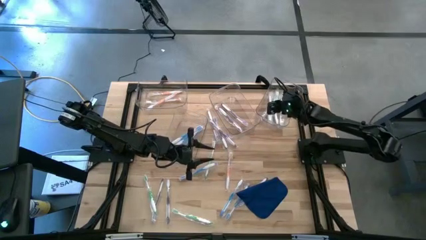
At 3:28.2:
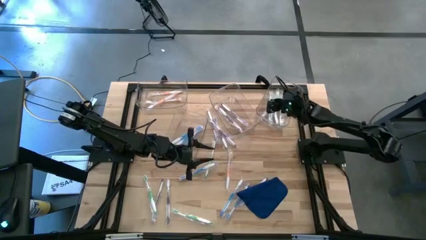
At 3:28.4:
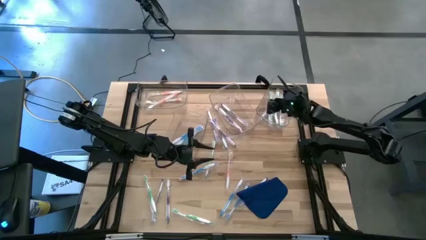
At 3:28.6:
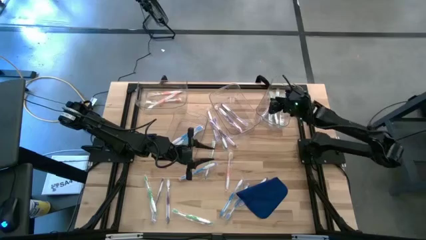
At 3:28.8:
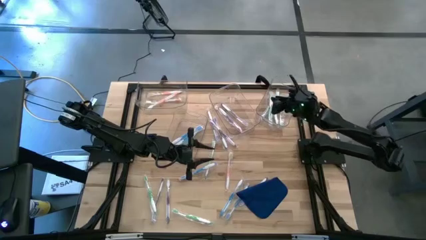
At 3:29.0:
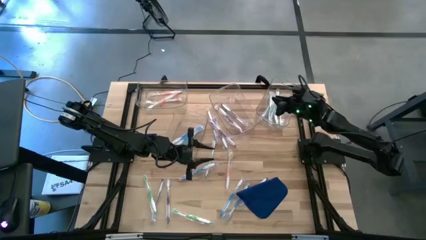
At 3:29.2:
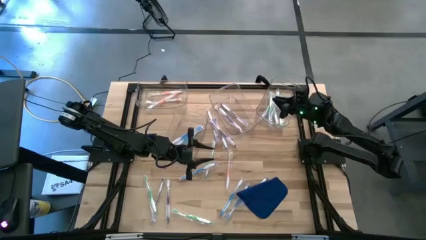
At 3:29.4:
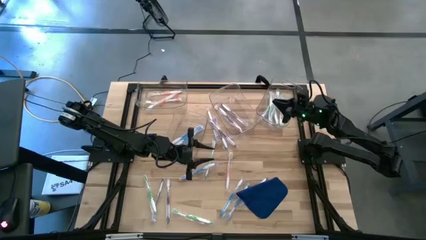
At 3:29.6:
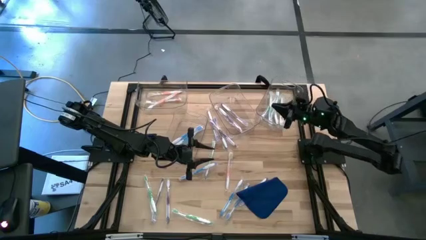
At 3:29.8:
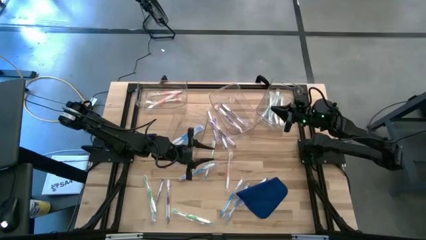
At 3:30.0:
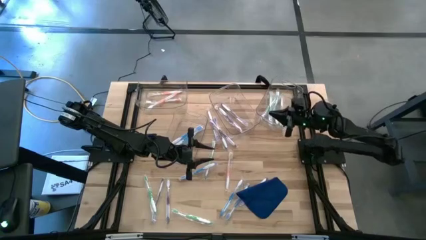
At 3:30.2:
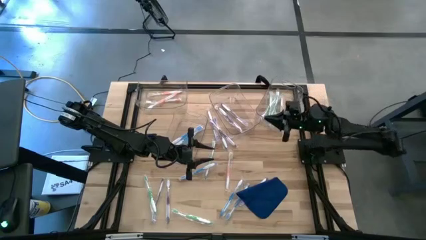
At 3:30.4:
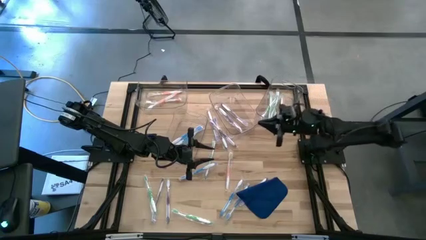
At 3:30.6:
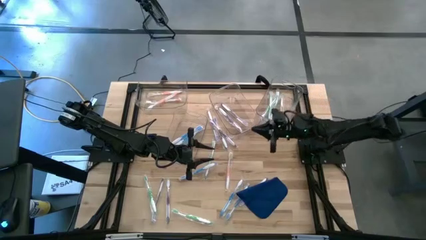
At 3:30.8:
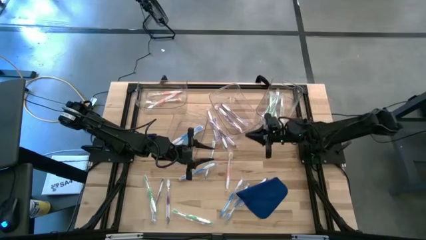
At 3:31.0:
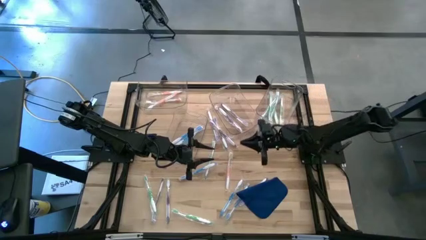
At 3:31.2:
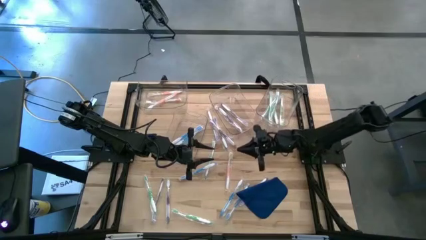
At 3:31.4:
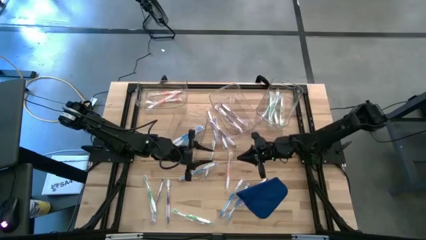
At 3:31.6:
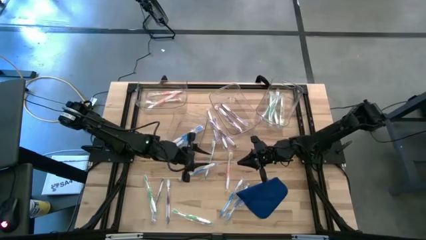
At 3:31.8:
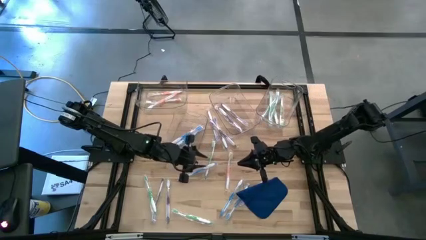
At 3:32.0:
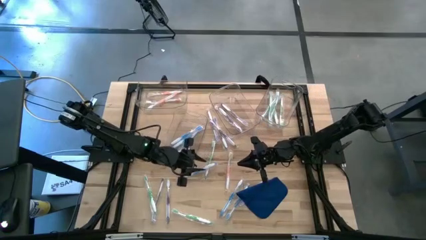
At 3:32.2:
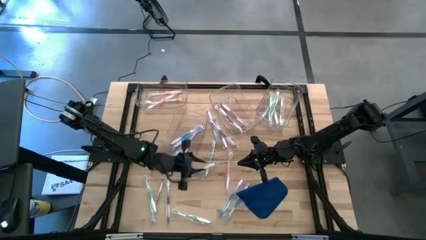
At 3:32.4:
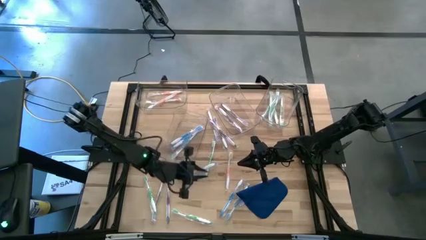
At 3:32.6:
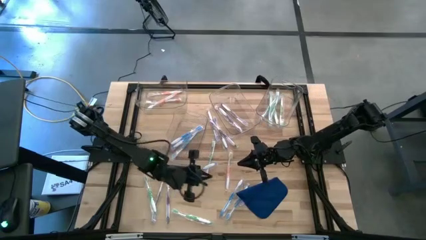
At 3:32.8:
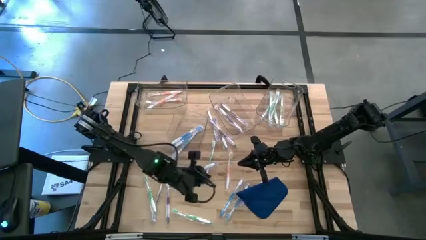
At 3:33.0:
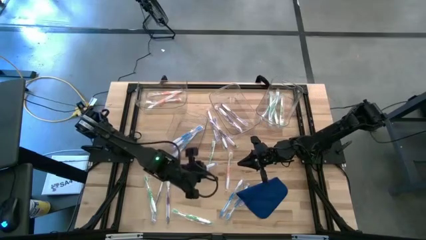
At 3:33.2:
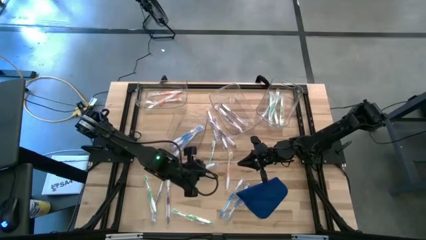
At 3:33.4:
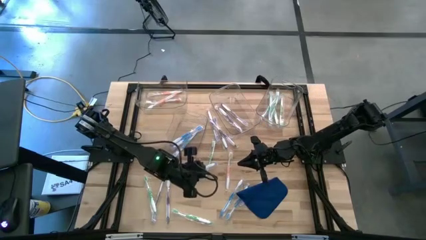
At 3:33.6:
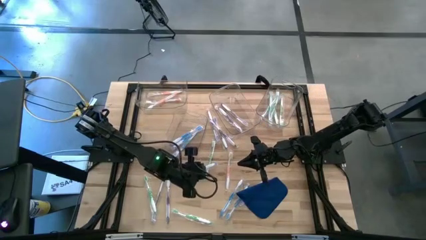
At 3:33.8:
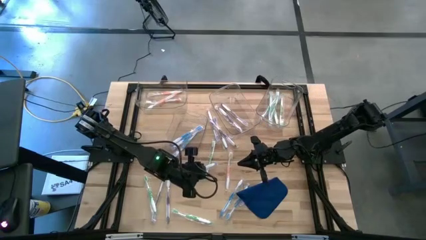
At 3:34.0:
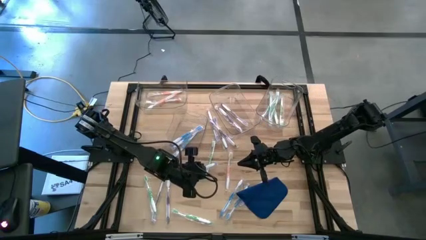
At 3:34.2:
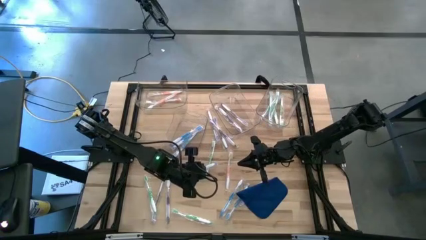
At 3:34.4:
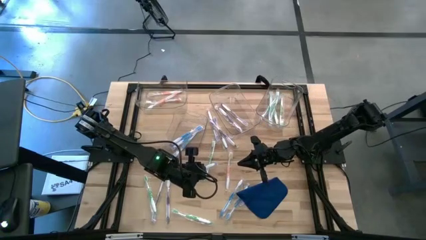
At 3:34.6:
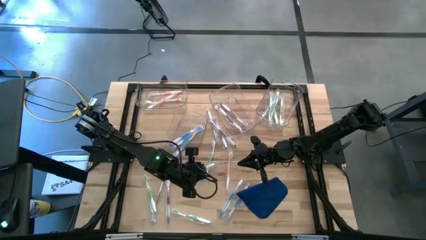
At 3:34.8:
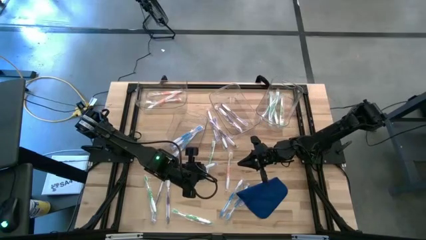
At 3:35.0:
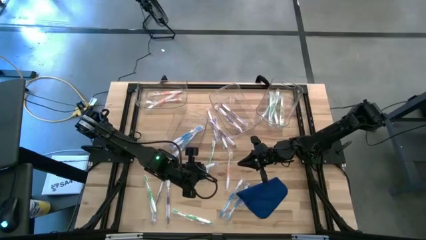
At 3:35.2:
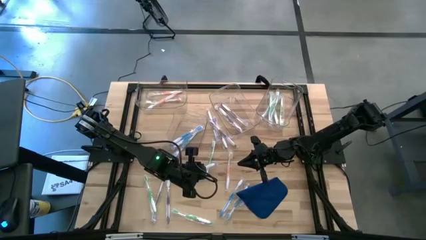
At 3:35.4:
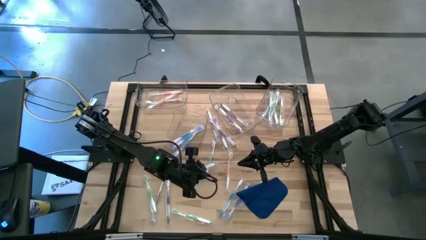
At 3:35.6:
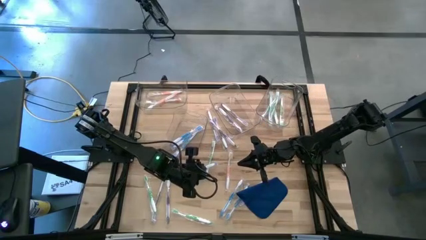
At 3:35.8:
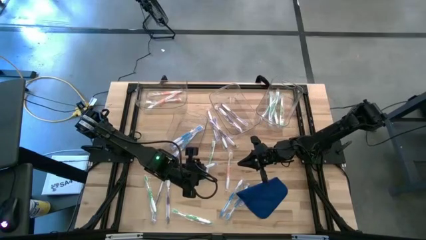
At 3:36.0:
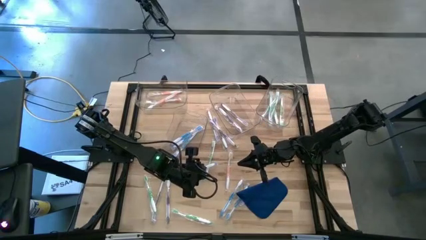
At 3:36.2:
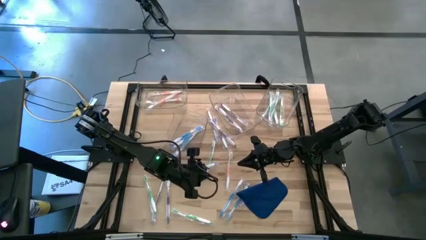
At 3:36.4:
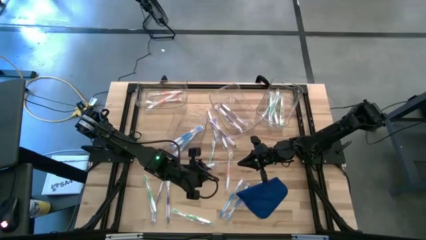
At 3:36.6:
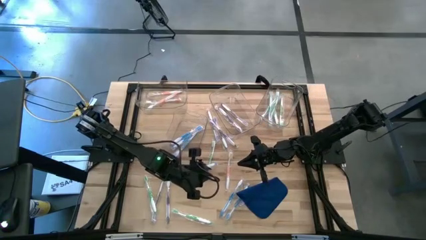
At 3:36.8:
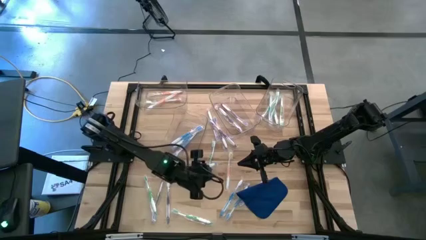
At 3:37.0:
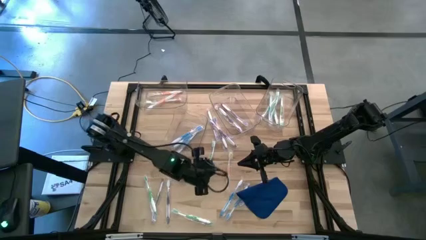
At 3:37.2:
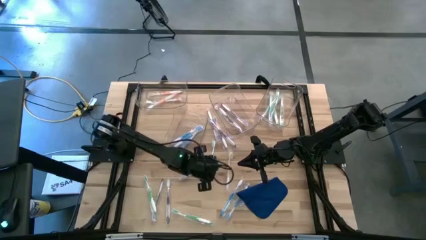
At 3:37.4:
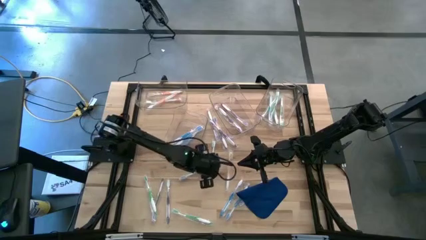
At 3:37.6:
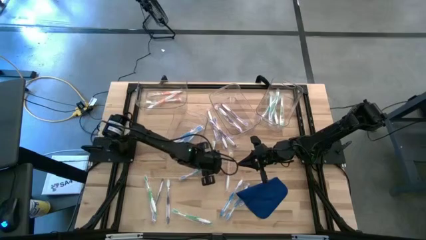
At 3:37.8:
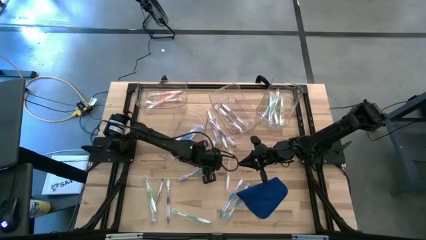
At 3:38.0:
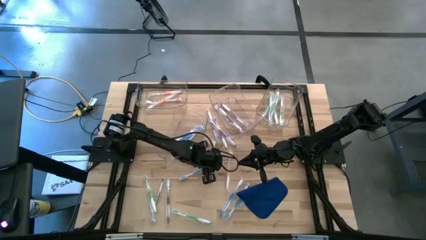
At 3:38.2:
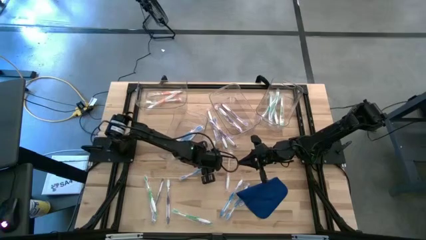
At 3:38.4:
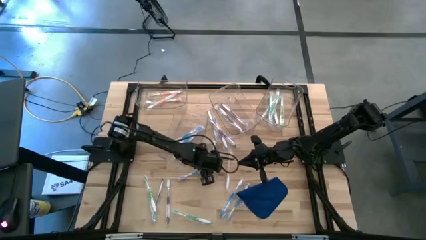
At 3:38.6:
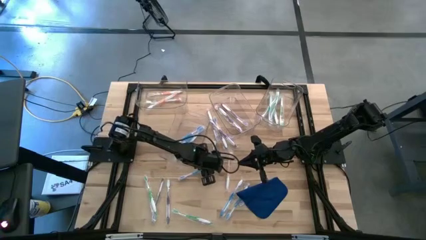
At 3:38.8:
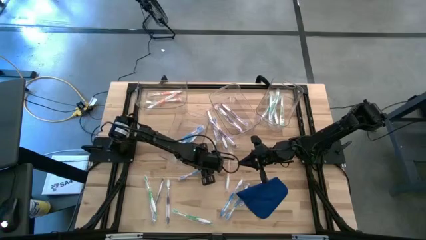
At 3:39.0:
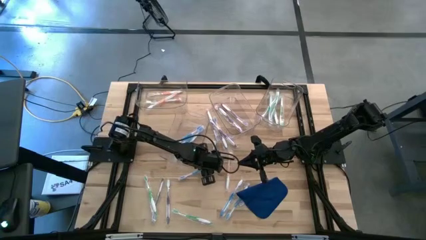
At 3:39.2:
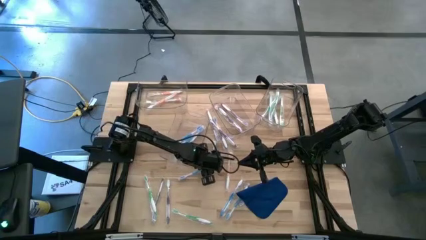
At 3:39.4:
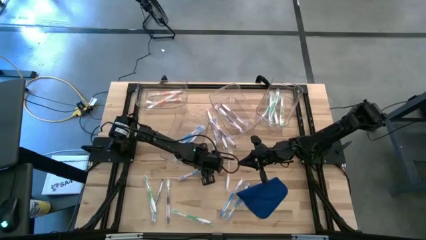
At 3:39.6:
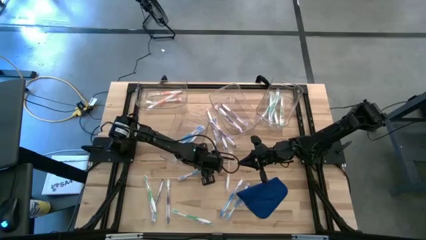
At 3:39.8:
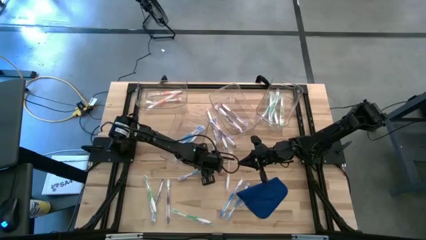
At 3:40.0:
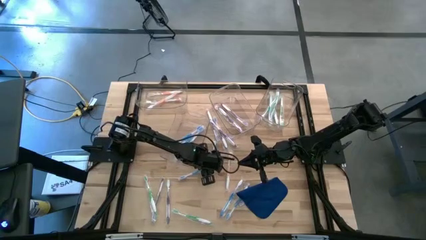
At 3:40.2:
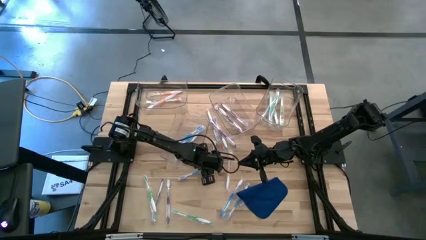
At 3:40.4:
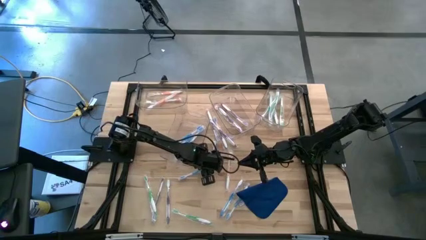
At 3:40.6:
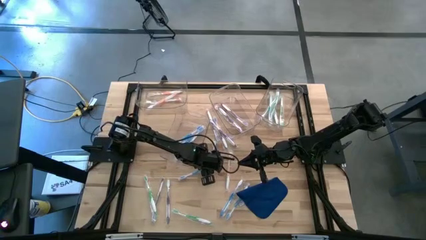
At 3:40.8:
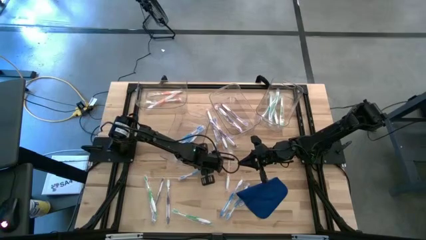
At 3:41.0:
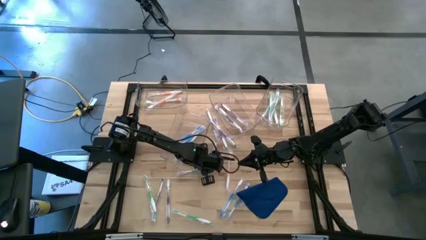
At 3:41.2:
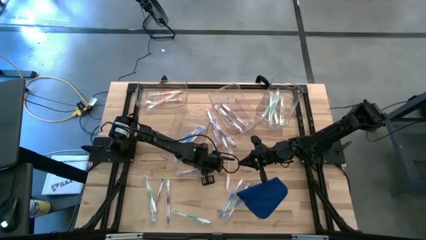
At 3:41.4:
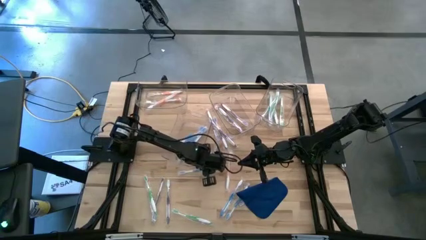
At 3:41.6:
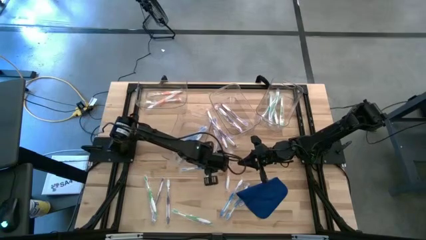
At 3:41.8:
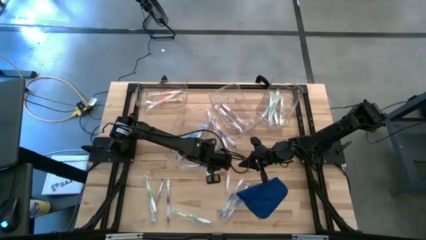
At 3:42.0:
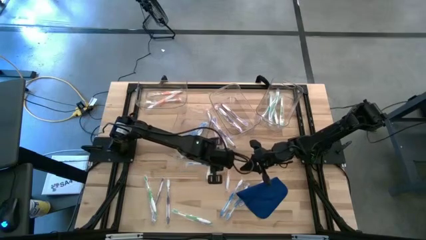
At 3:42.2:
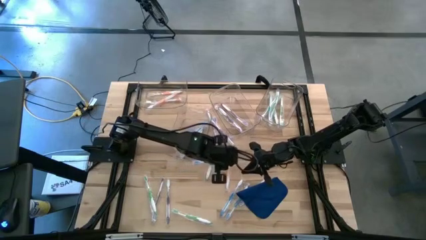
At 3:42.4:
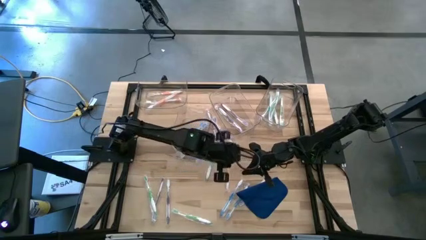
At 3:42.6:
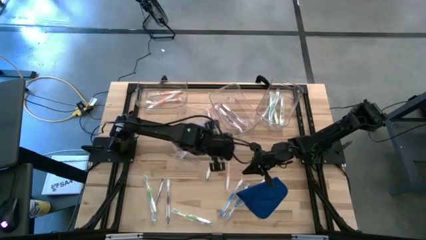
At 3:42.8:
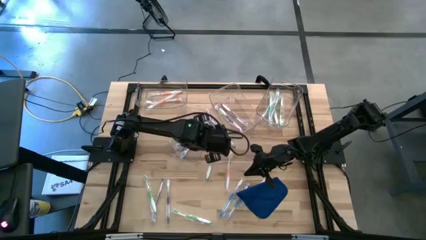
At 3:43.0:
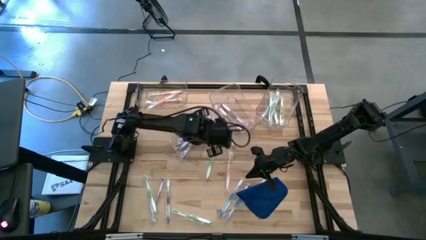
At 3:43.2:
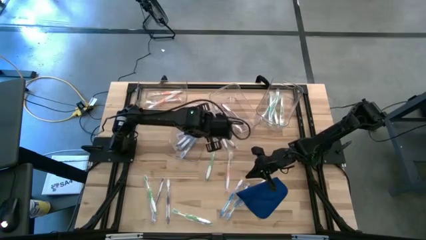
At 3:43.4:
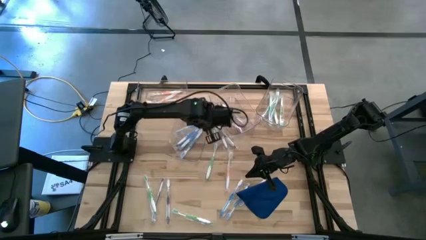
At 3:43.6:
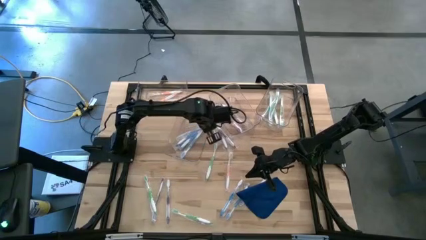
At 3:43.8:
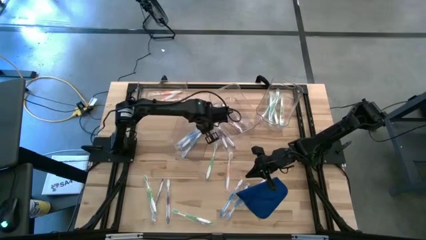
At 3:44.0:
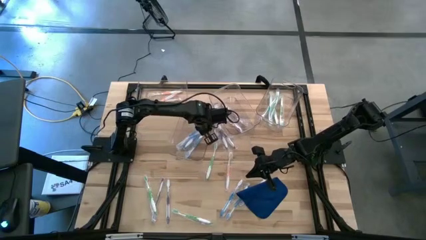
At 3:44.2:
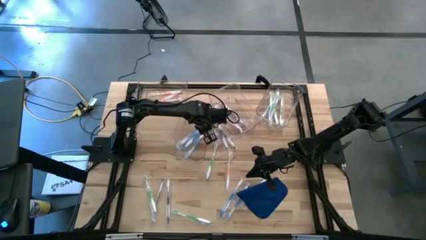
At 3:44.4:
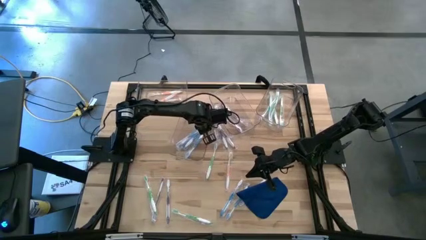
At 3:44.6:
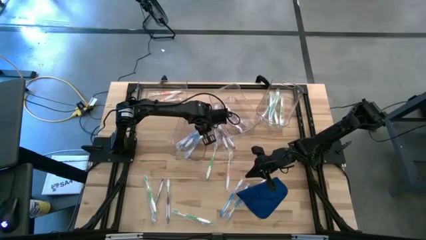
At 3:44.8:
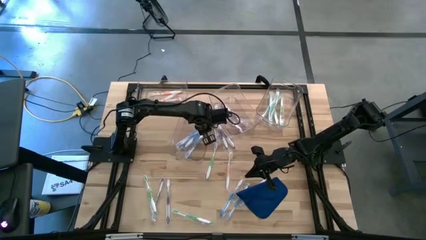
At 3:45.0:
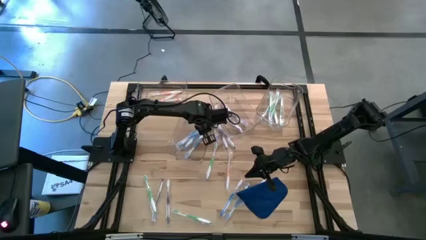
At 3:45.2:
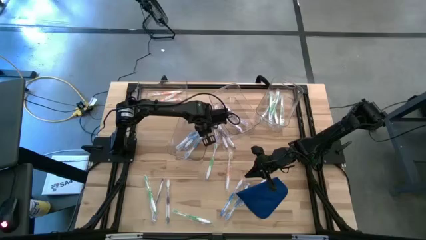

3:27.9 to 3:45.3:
Task: Pick & Place Toothbrushes
Put the blue toothbrush into the bottom transparent bin
